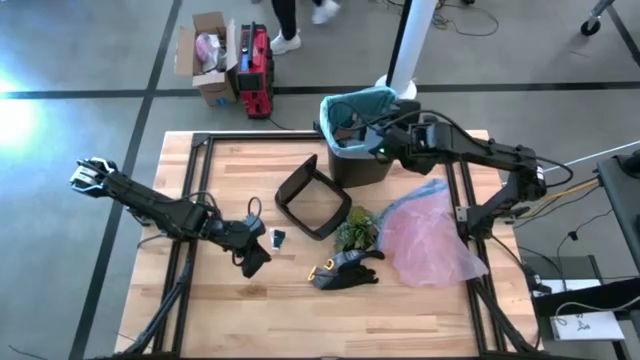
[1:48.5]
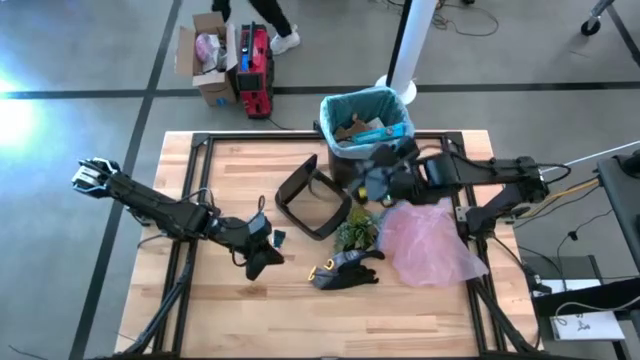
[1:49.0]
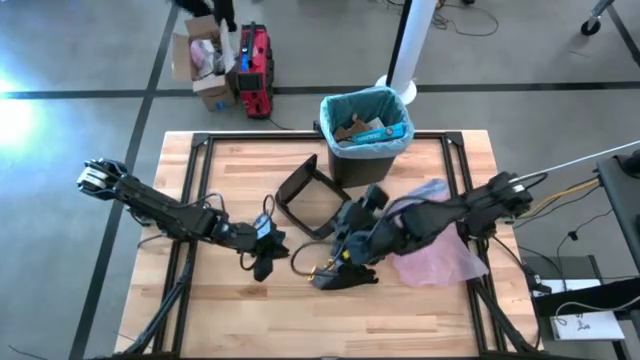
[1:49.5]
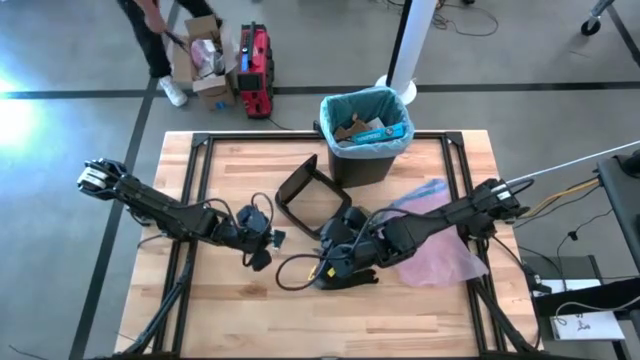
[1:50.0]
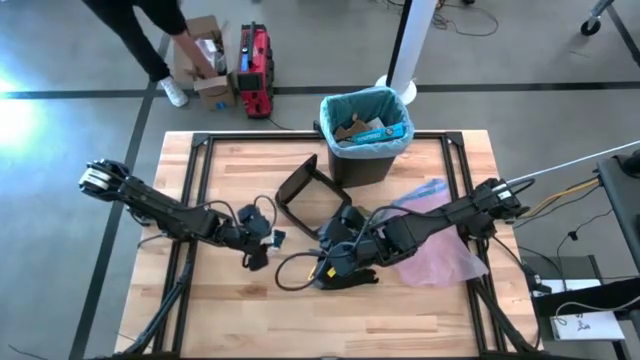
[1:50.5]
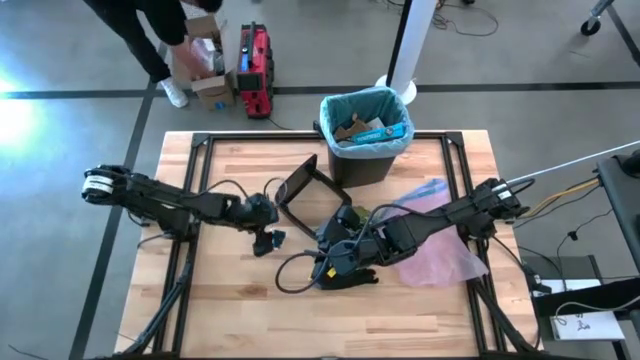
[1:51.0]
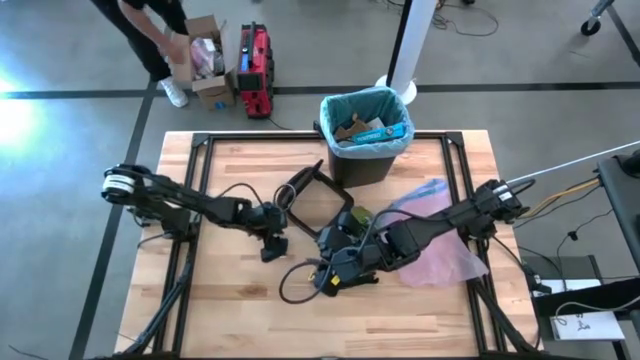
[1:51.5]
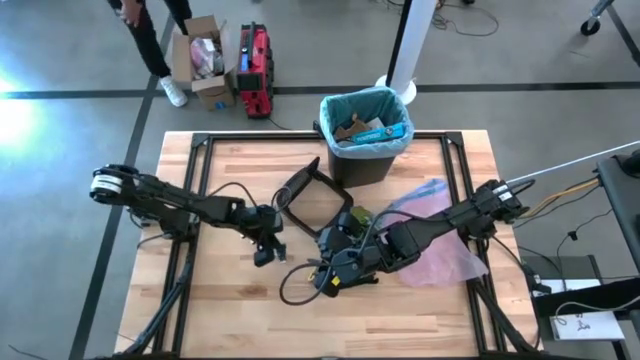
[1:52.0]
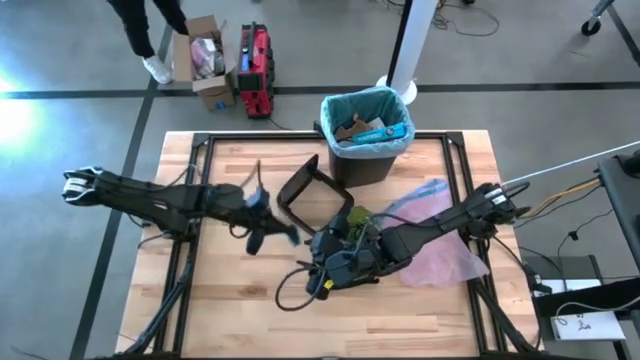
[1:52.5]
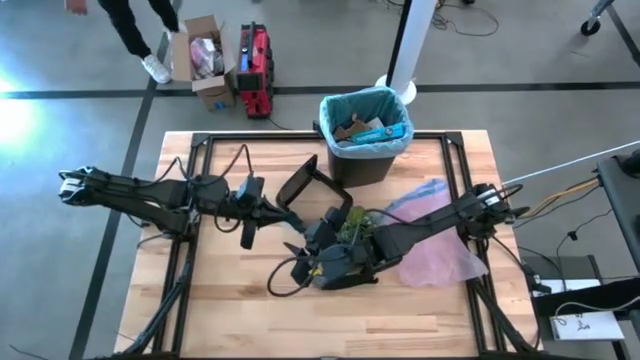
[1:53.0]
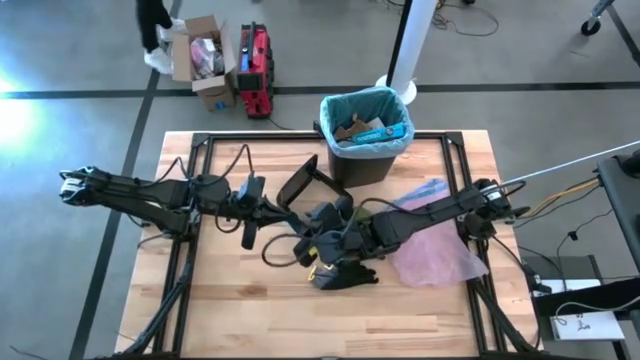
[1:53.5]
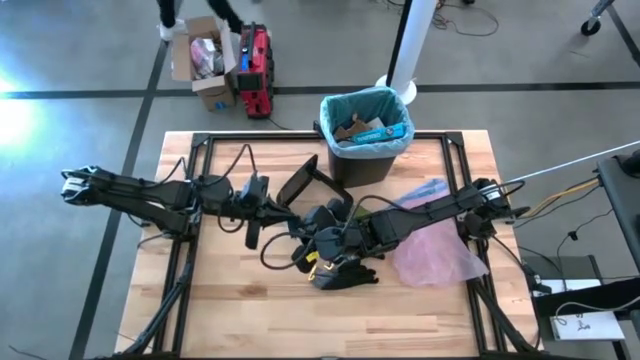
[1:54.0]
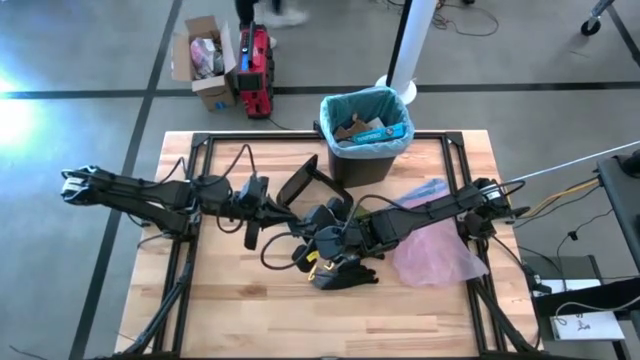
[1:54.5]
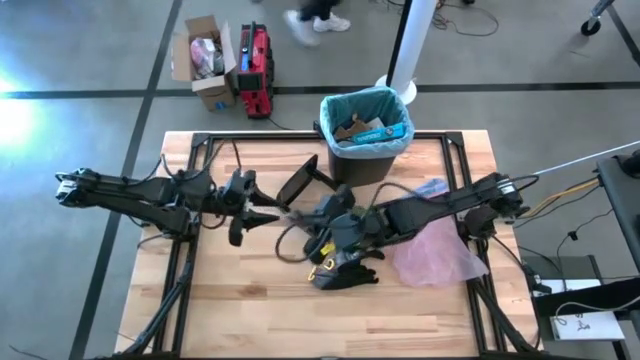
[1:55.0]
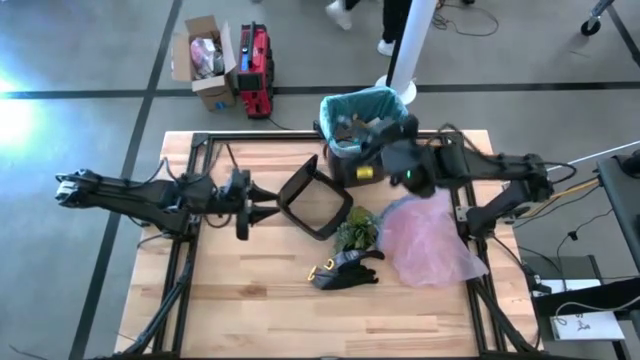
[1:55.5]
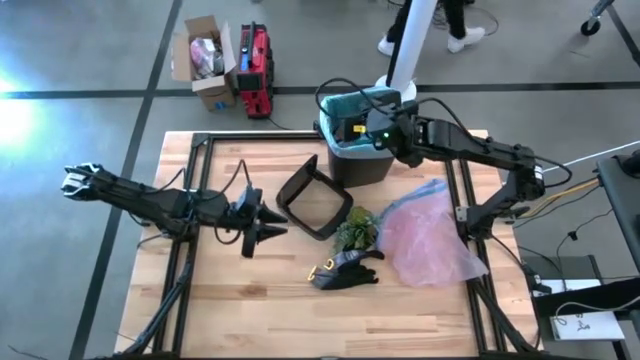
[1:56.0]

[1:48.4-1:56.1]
Task: place trash/remove bag and relplace
Put the white paper into the trash bin

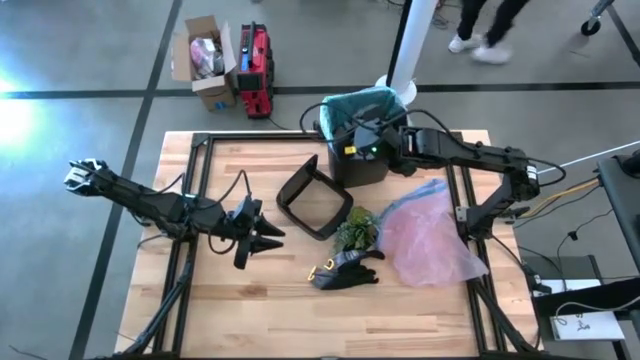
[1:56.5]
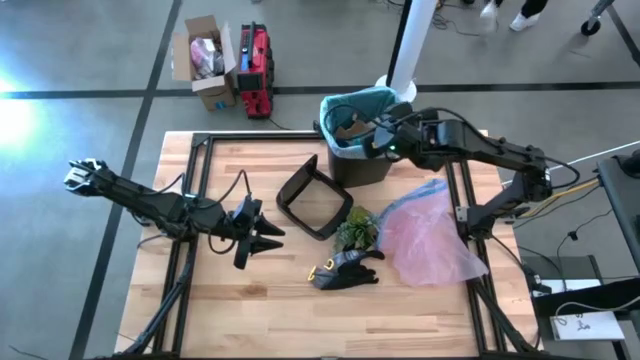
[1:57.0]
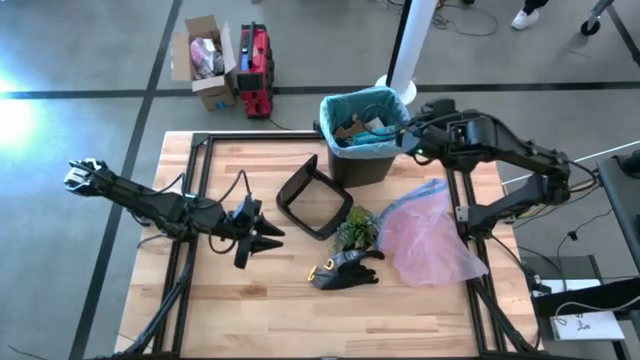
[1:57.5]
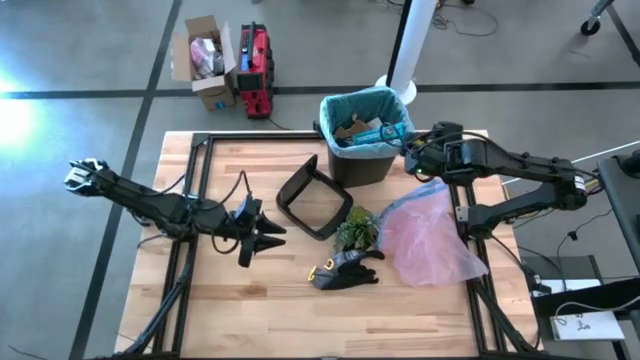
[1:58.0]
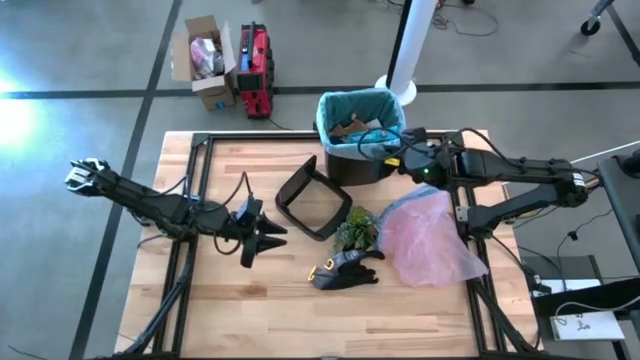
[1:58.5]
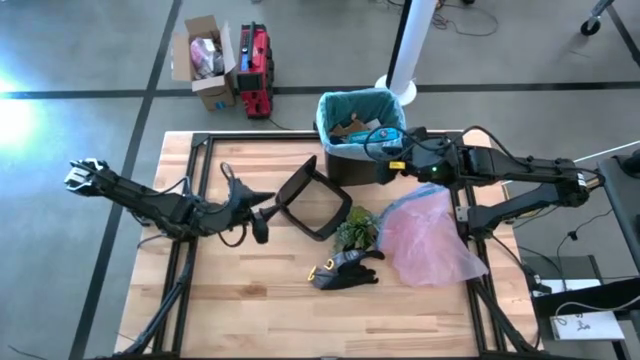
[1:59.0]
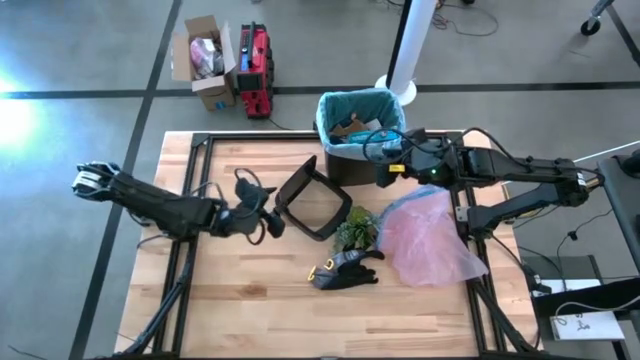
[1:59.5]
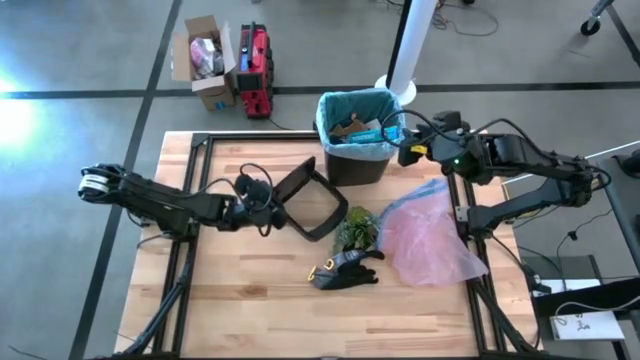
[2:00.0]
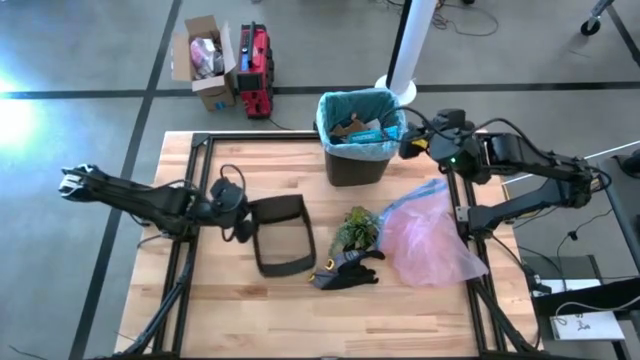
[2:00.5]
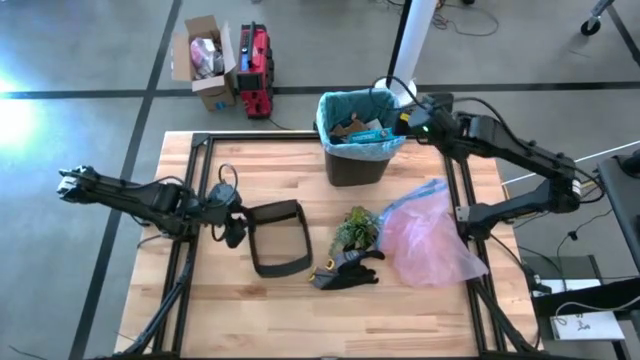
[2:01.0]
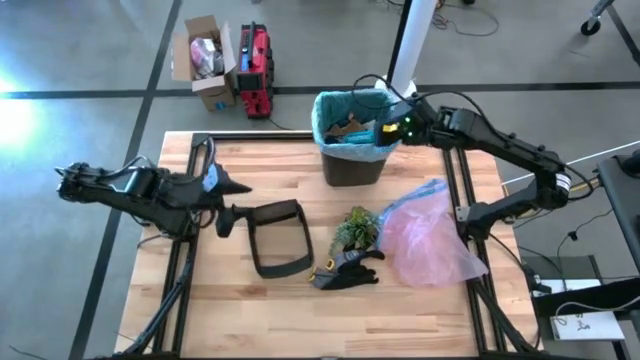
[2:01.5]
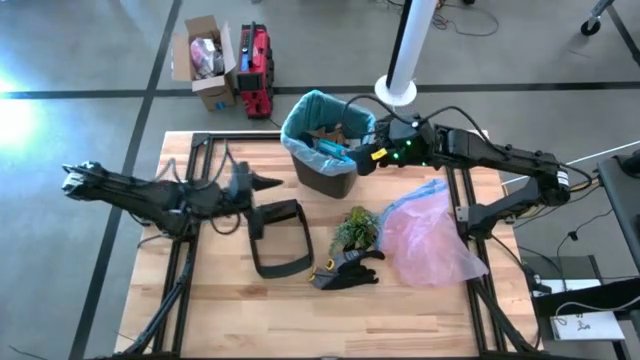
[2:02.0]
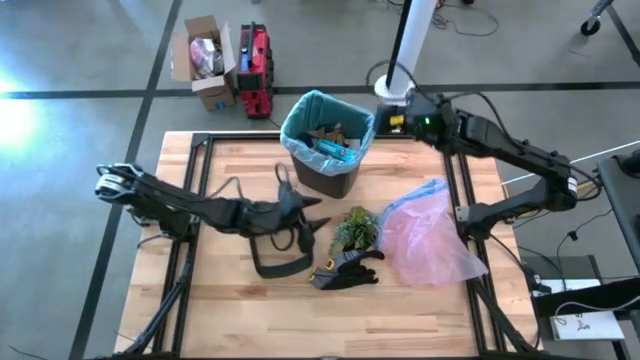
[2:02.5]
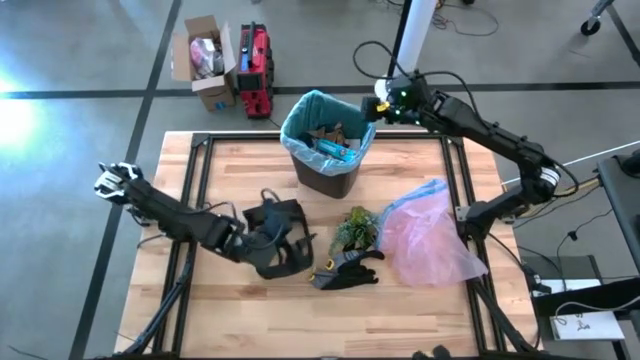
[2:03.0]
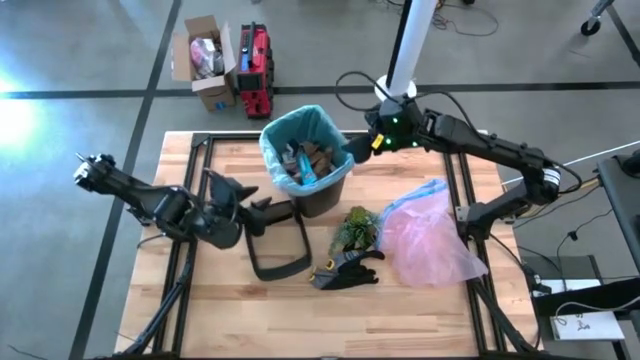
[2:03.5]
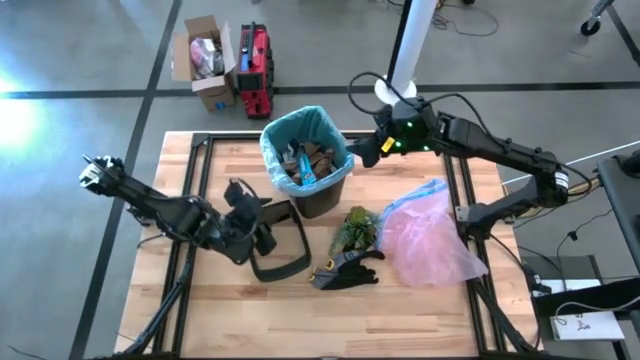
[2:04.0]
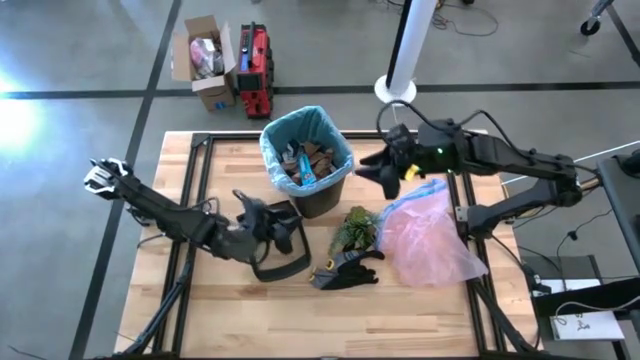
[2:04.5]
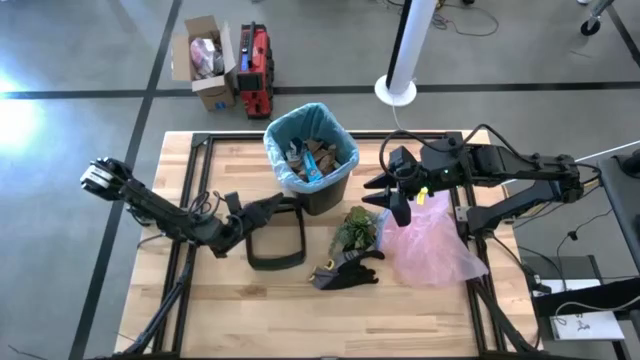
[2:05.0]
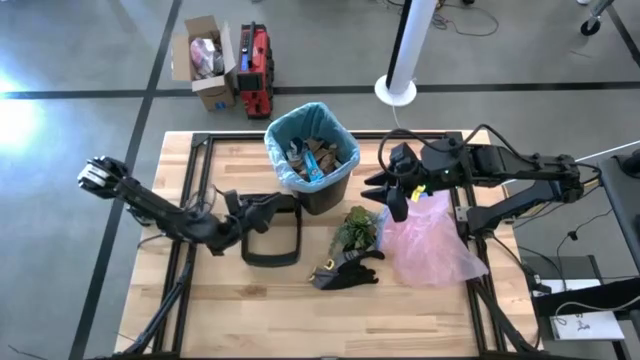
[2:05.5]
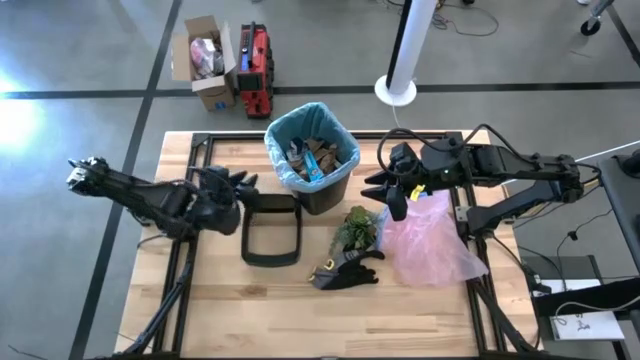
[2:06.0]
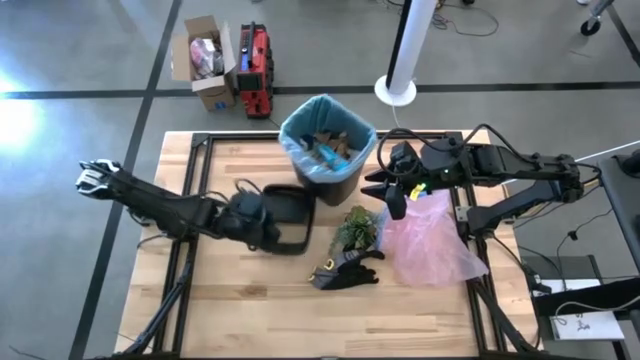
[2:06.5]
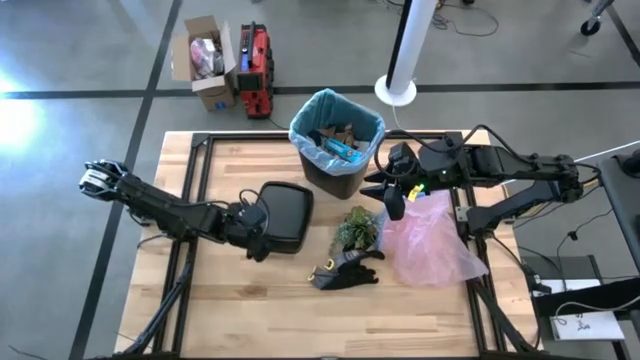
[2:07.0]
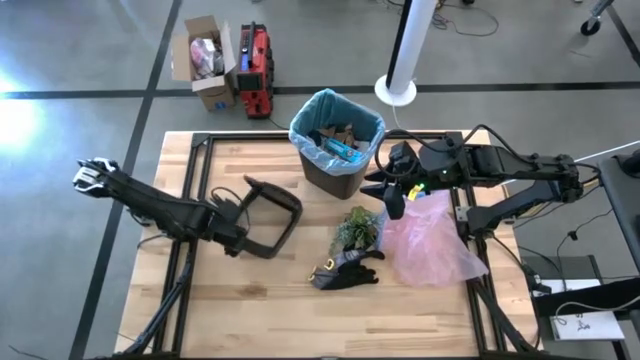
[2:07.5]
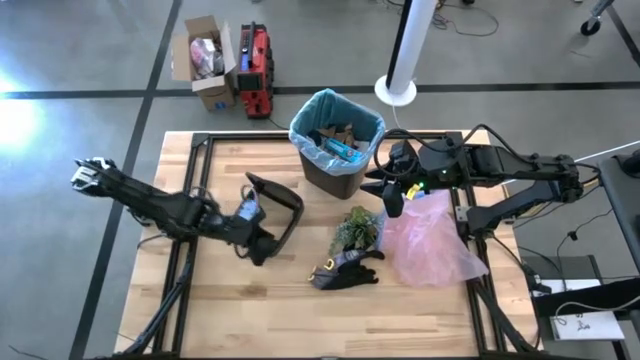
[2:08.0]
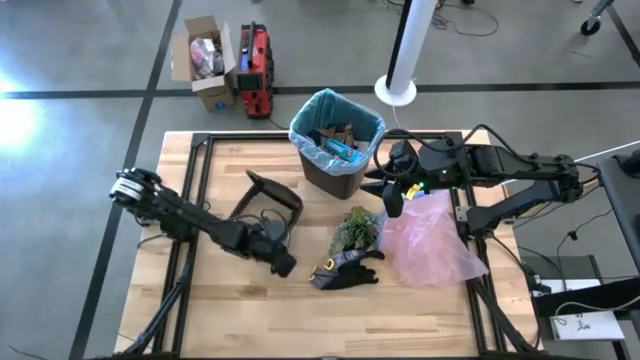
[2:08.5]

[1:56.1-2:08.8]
Remove trash bag from trash bin
